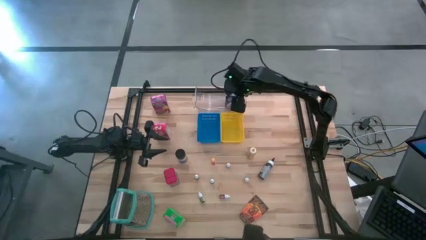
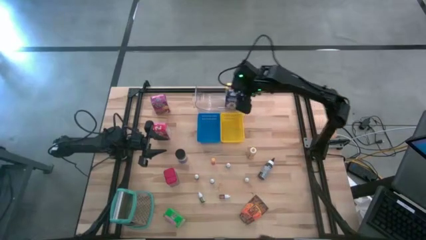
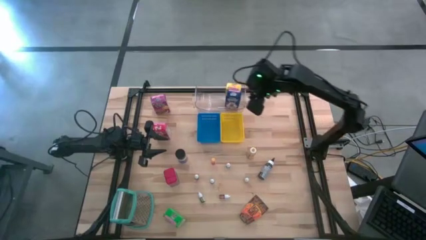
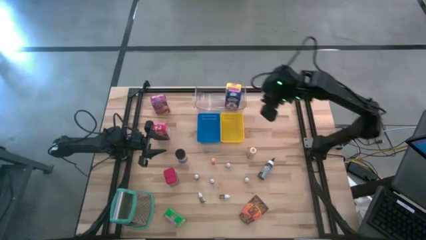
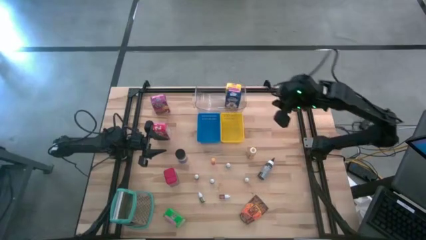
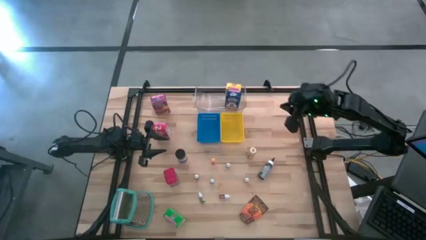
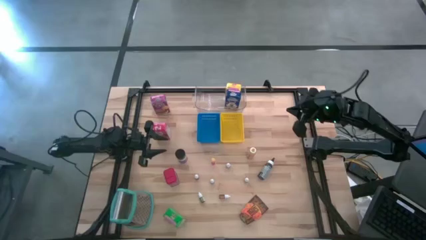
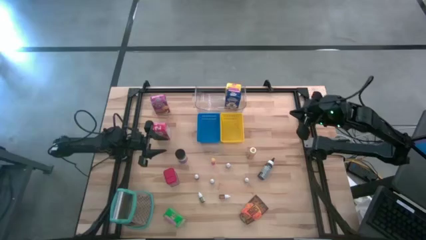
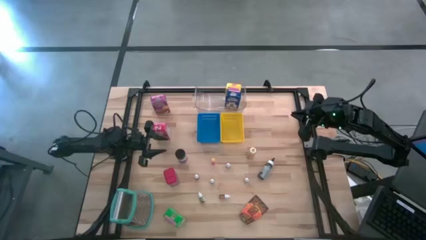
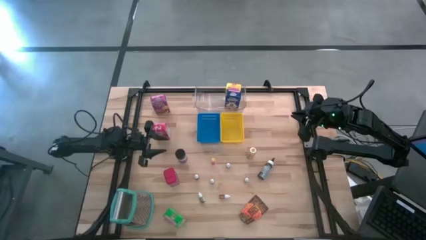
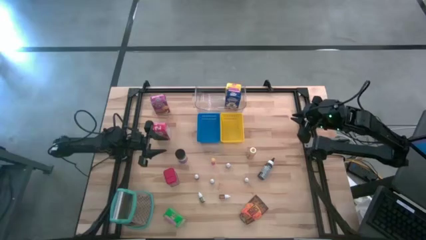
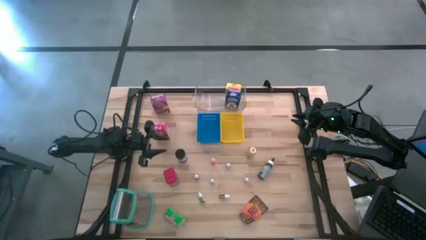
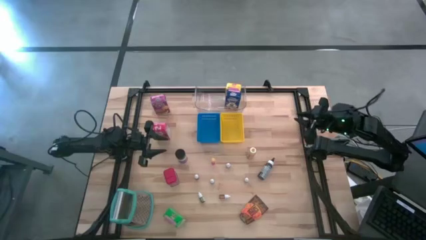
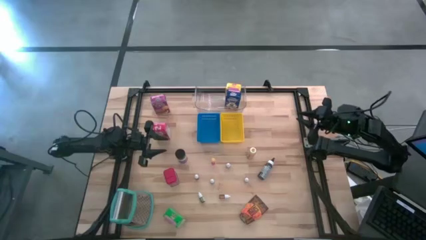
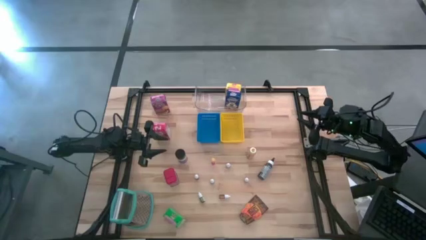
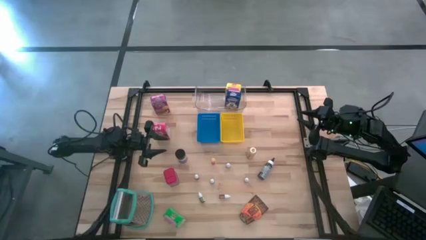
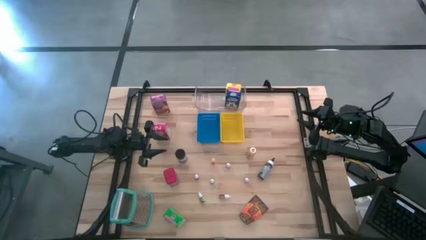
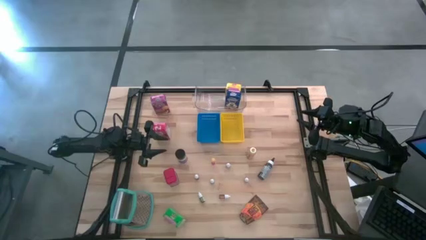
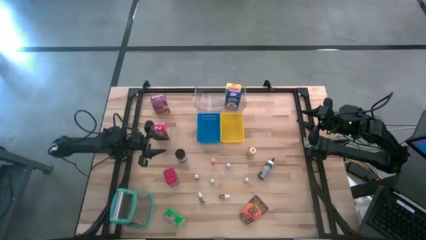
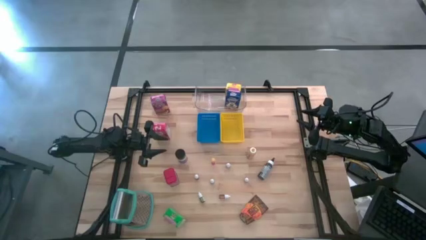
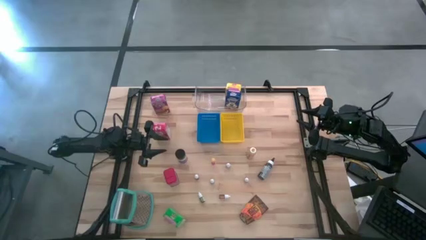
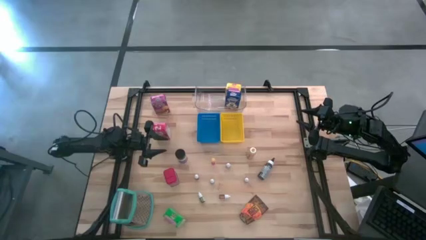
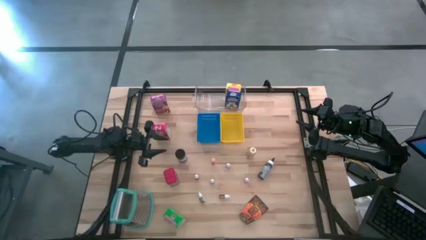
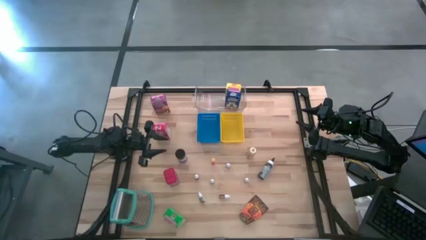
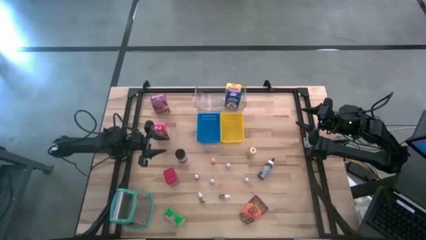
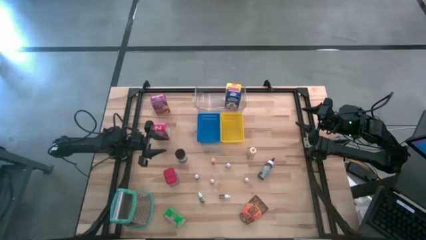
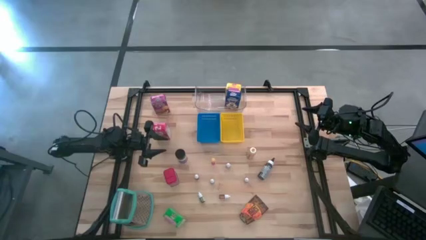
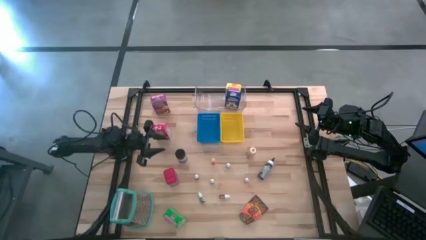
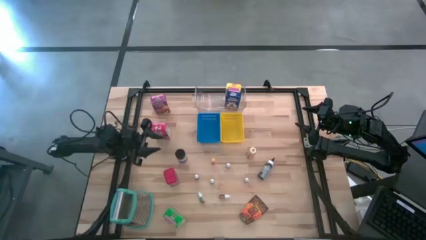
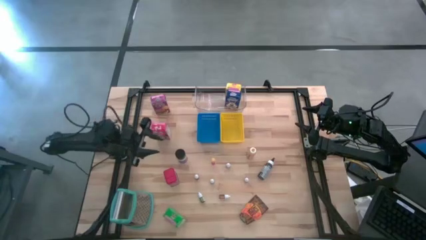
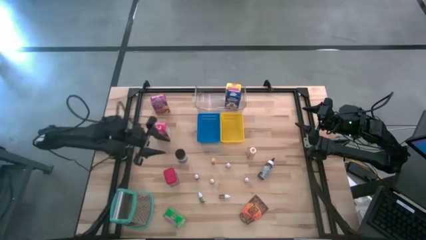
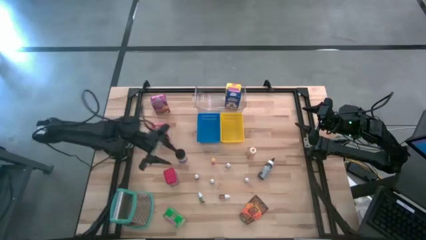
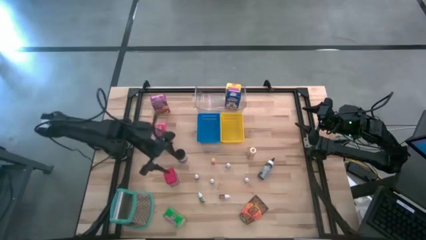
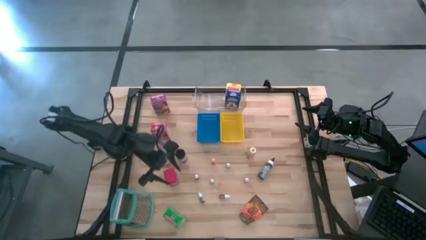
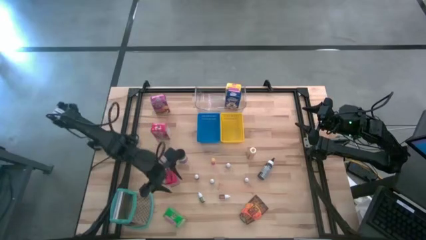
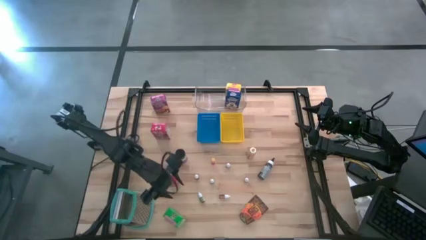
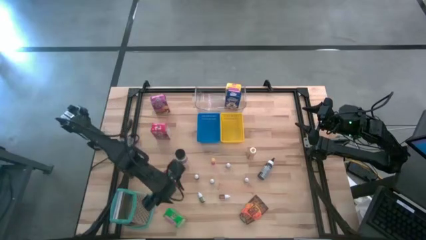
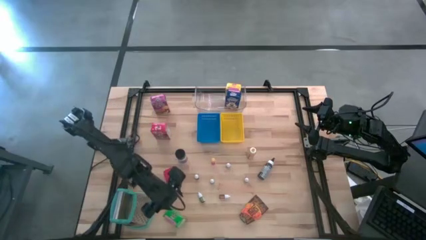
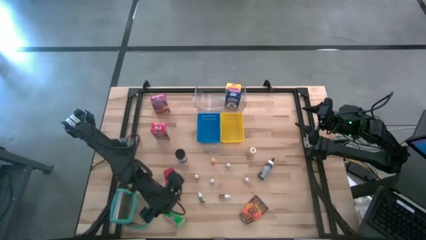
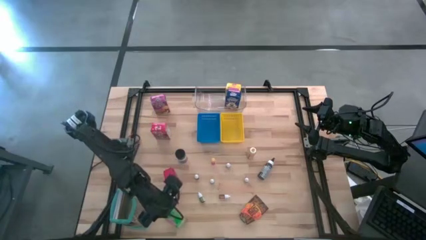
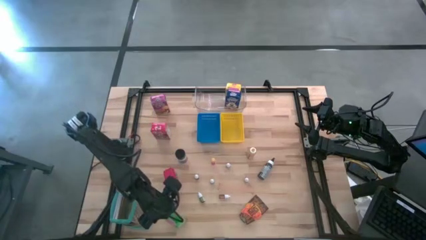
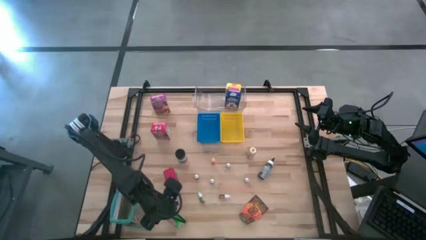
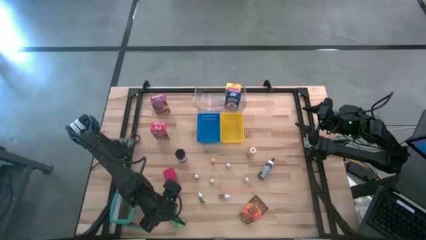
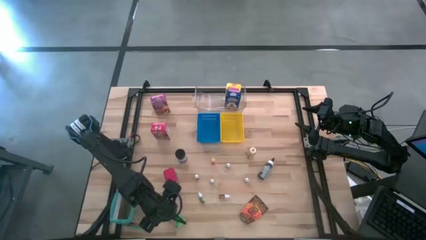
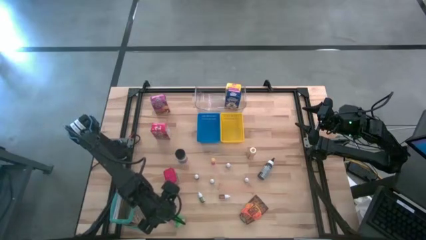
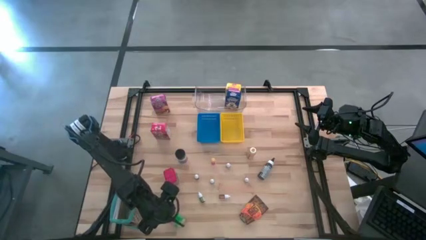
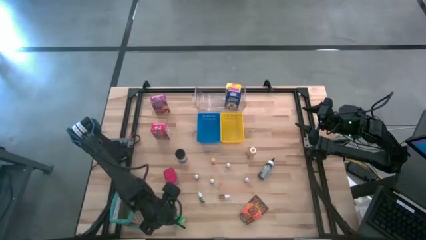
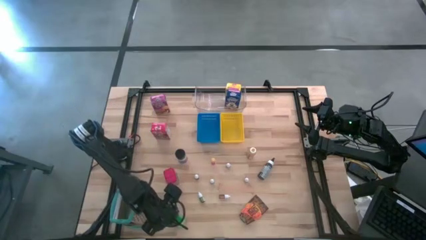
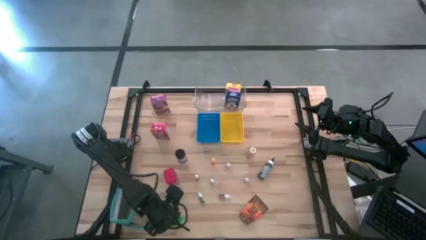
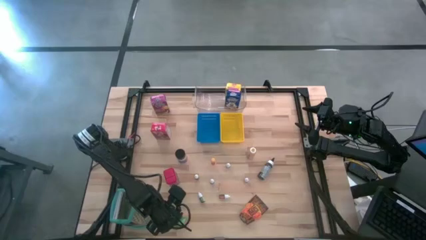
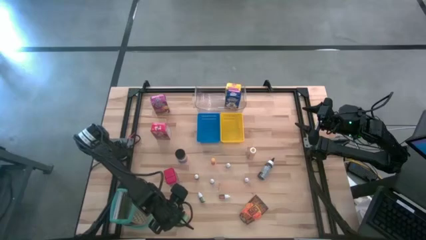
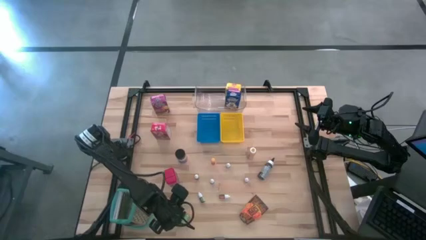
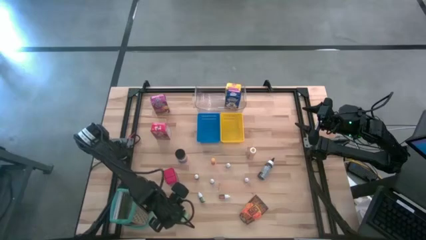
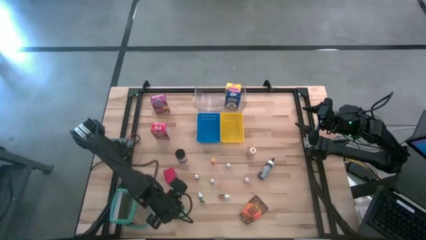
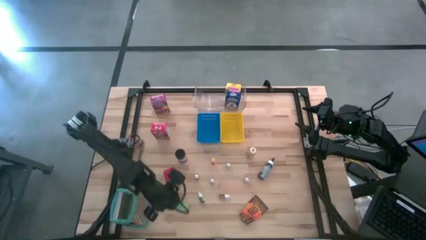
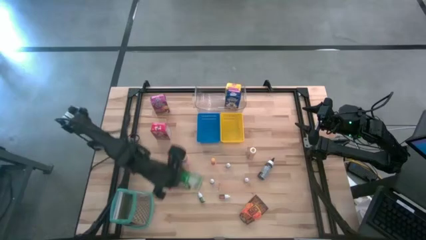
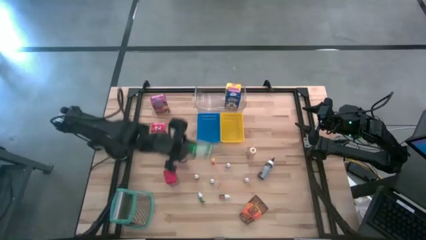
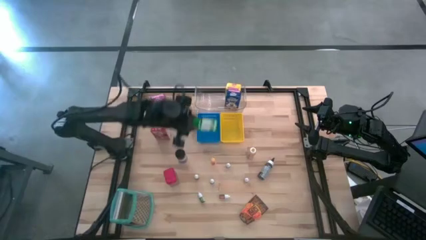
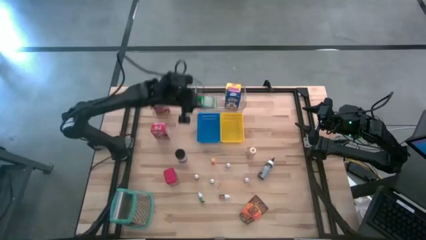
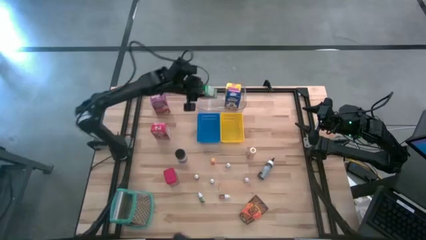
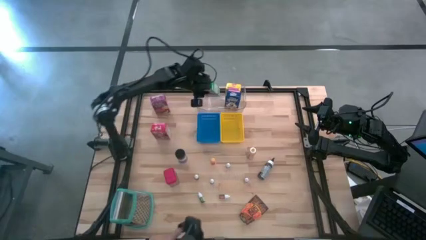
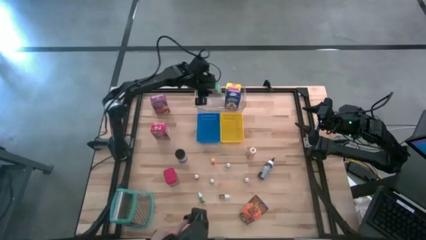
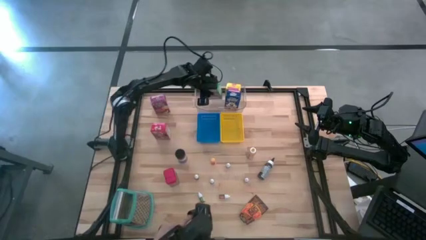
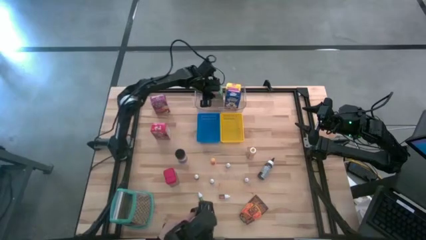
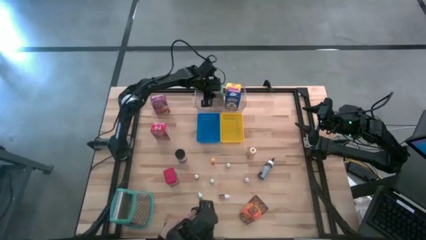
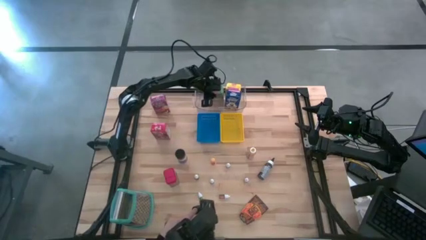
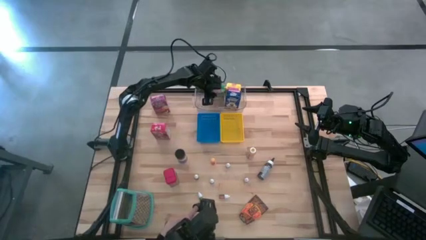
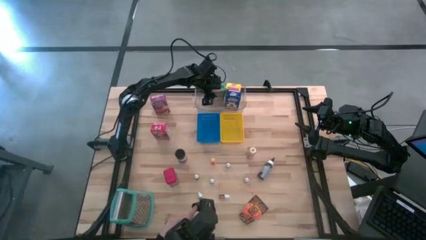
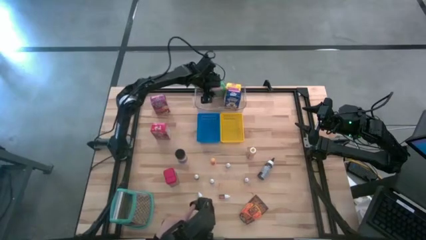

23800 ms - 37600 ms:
Task: Pick & Place Kitchen Items
Put the green cereal box into the transparent bin

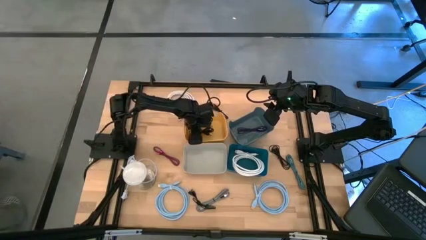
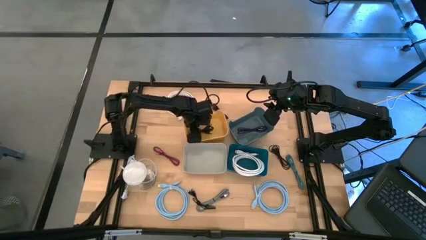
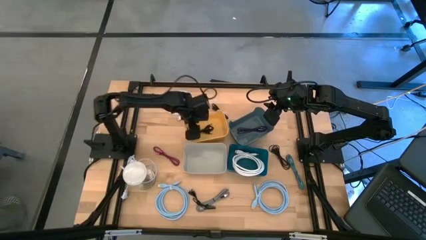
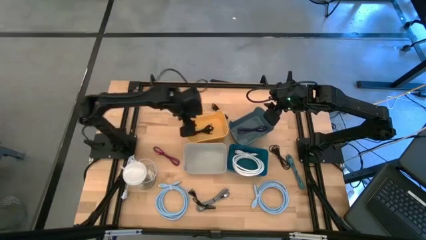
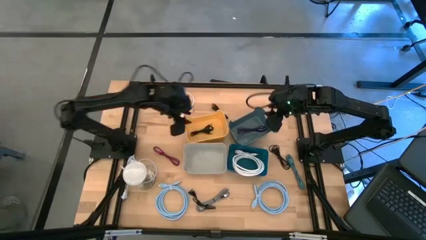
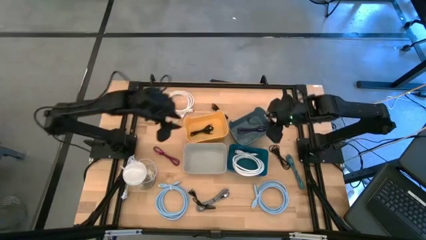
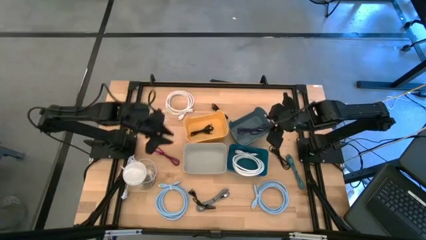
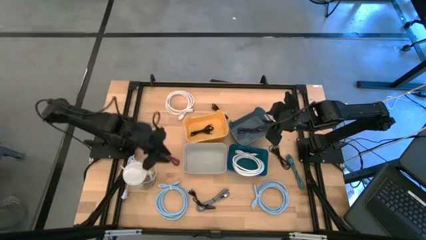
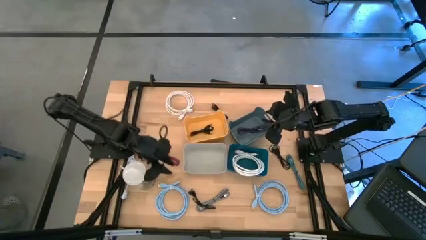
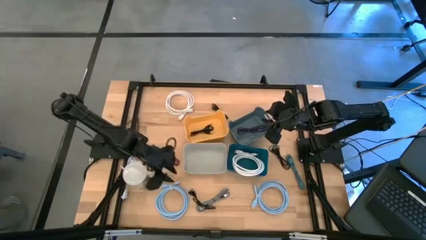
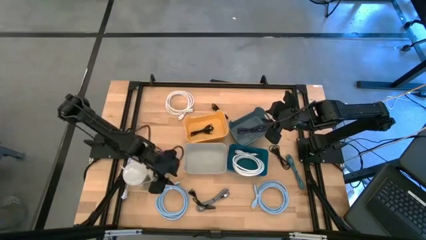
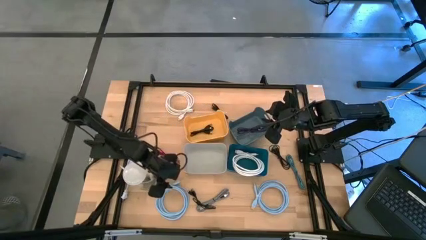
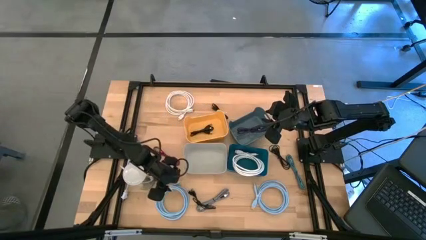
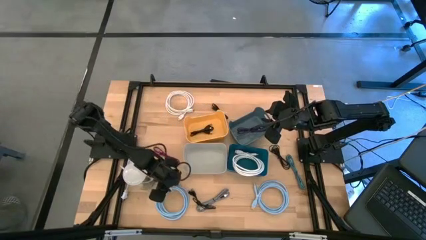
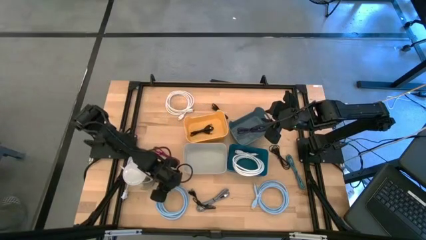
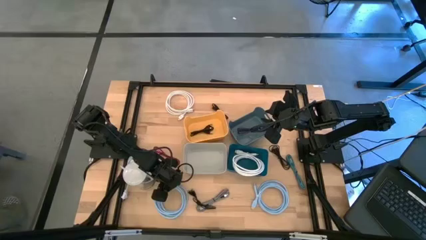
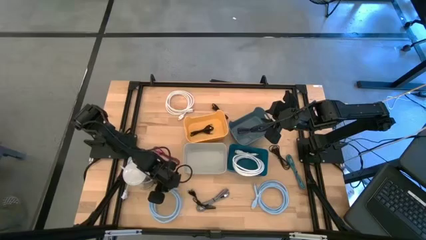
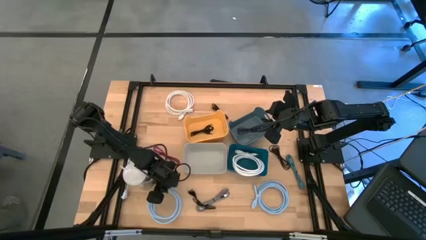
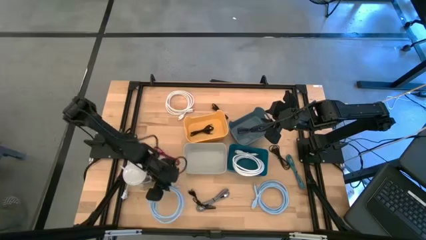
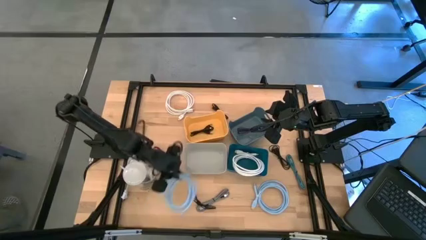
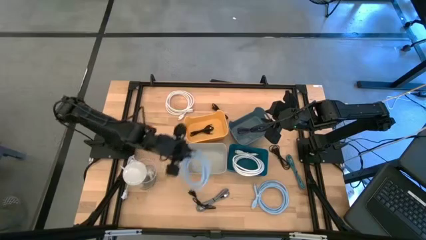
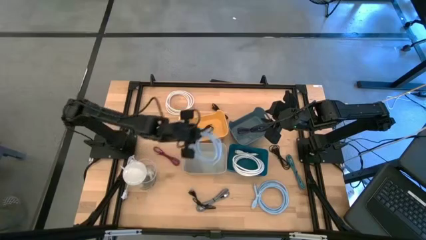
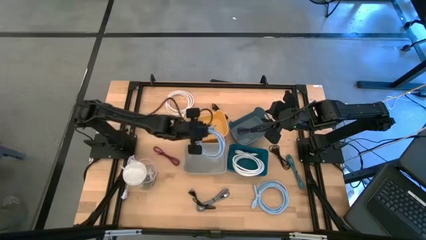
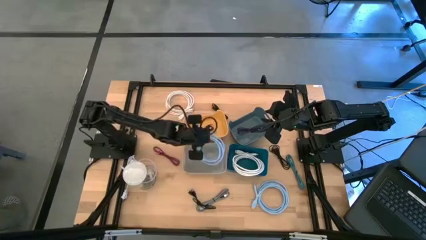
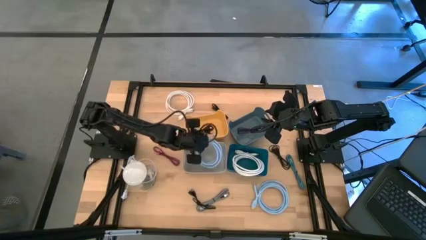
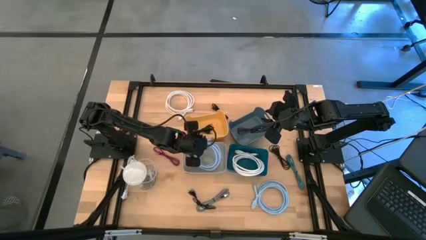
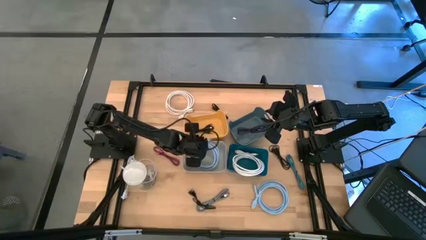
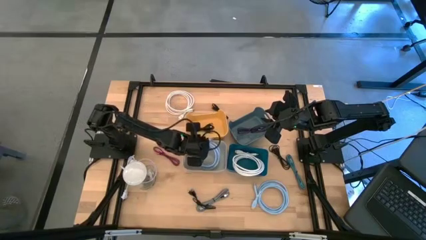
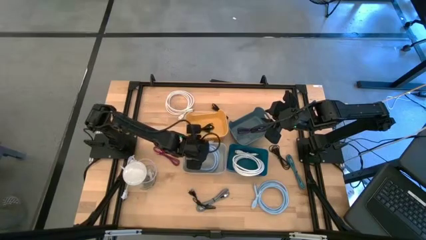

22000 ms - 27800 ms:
Task: Pick & Place USB Port
Put the light blue USB cable into the gray bin
